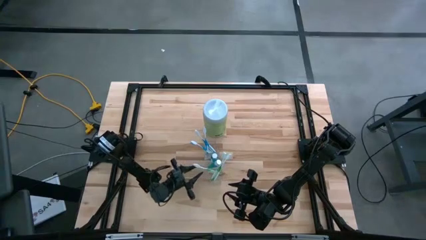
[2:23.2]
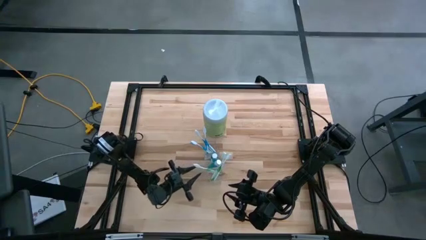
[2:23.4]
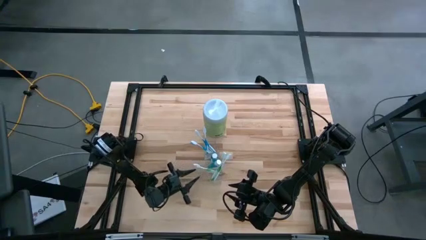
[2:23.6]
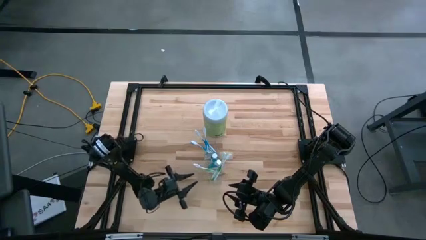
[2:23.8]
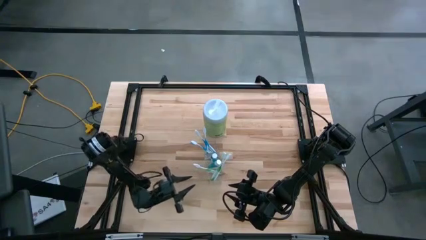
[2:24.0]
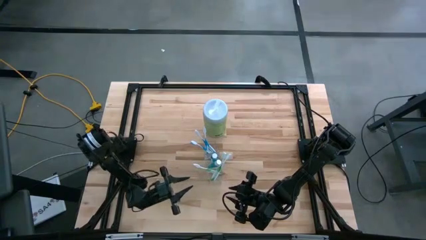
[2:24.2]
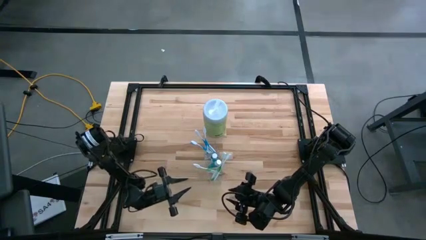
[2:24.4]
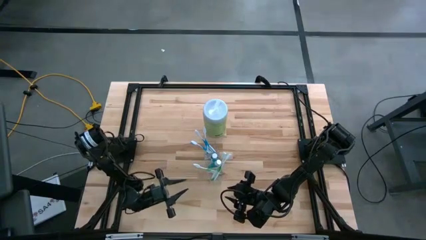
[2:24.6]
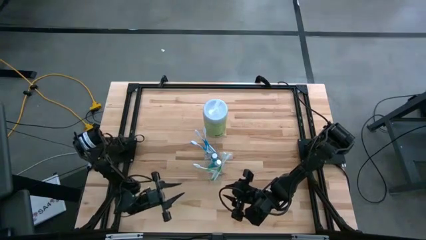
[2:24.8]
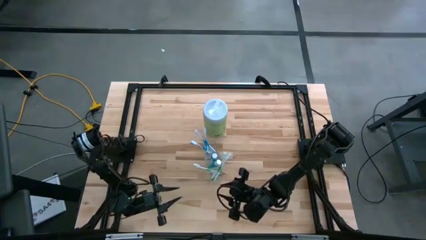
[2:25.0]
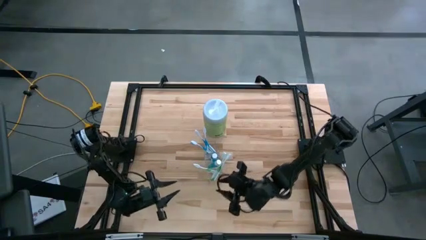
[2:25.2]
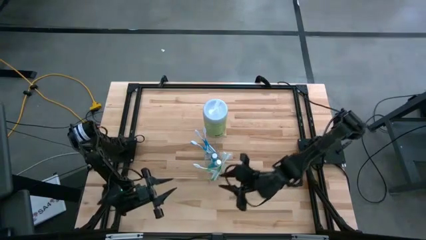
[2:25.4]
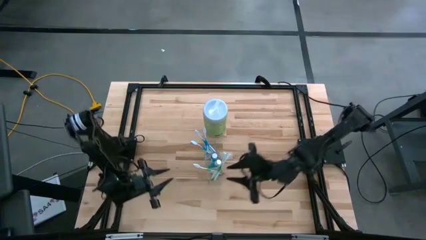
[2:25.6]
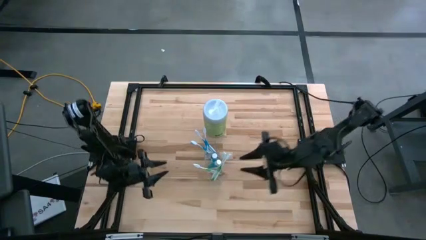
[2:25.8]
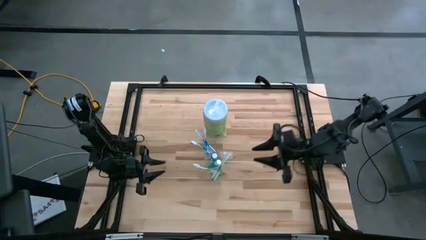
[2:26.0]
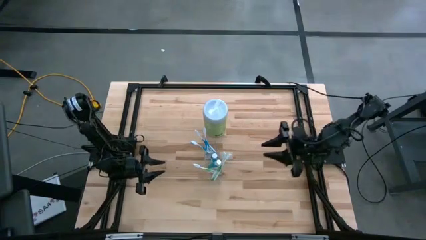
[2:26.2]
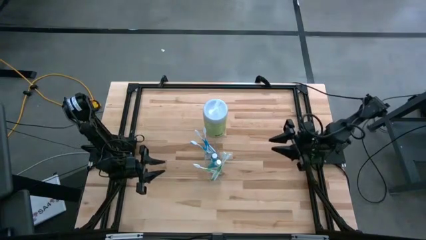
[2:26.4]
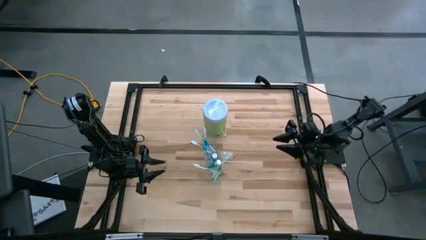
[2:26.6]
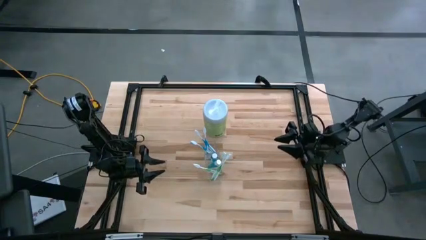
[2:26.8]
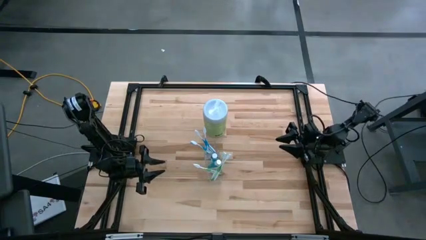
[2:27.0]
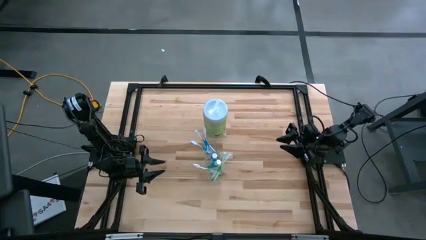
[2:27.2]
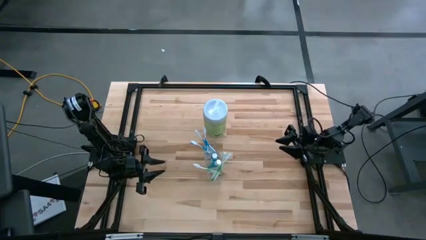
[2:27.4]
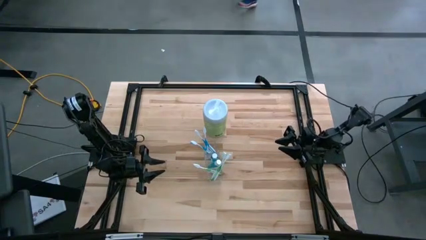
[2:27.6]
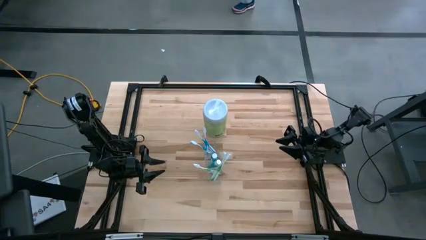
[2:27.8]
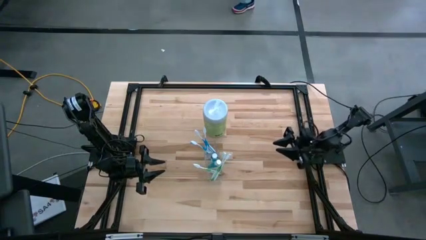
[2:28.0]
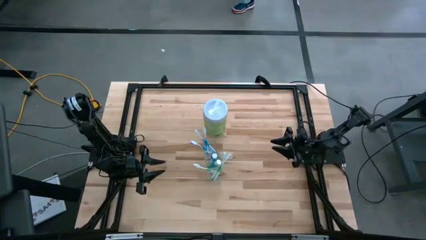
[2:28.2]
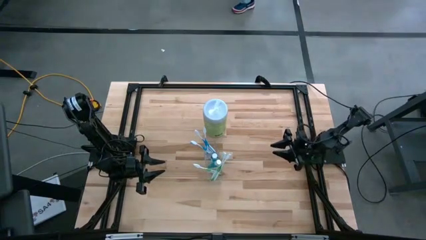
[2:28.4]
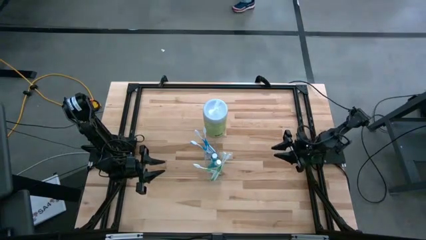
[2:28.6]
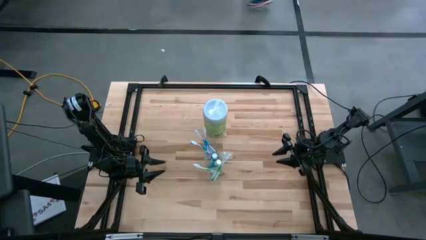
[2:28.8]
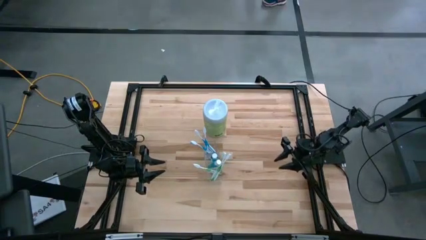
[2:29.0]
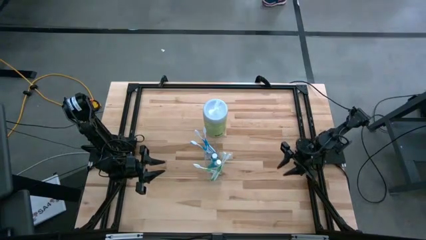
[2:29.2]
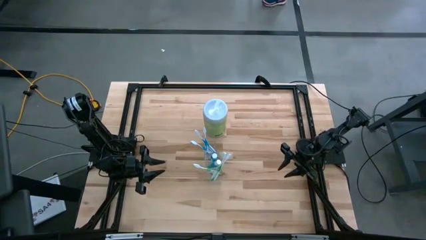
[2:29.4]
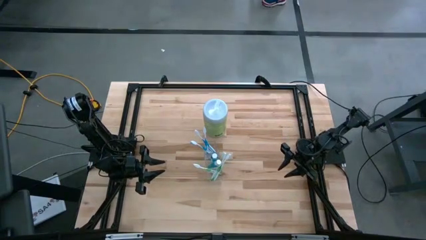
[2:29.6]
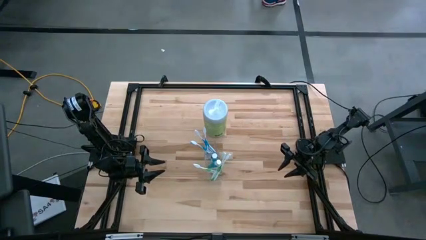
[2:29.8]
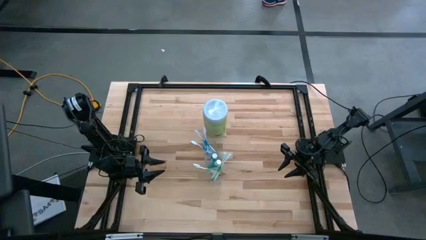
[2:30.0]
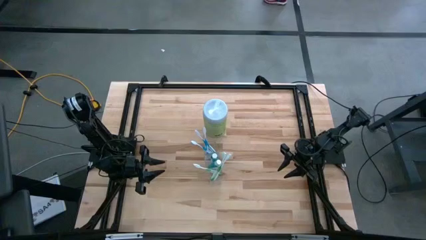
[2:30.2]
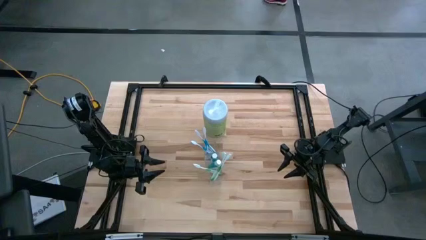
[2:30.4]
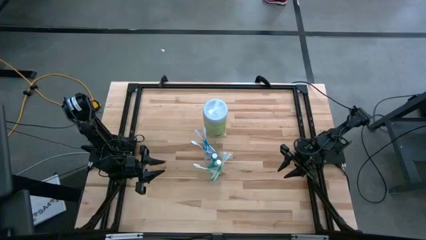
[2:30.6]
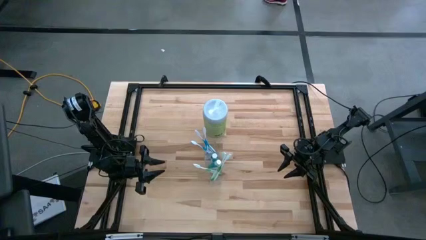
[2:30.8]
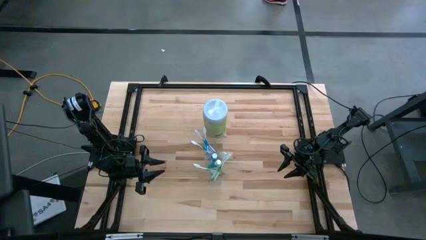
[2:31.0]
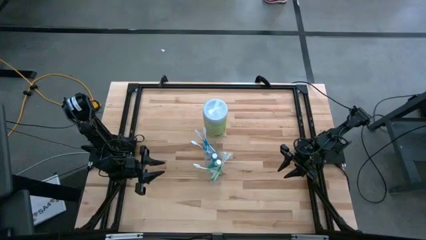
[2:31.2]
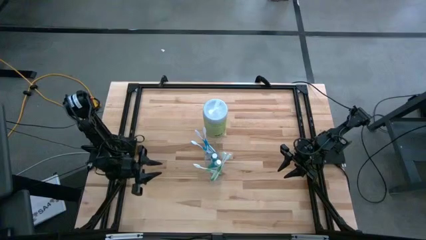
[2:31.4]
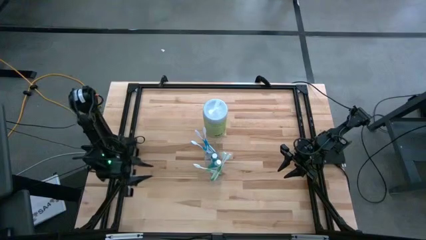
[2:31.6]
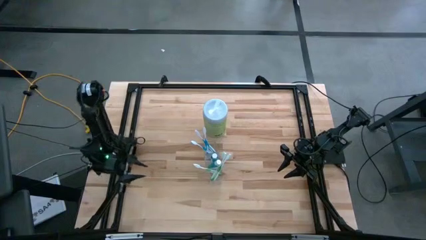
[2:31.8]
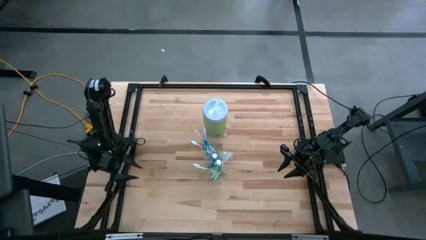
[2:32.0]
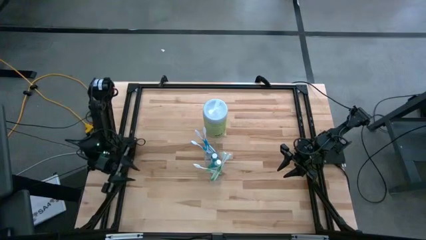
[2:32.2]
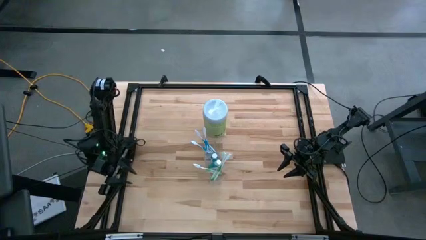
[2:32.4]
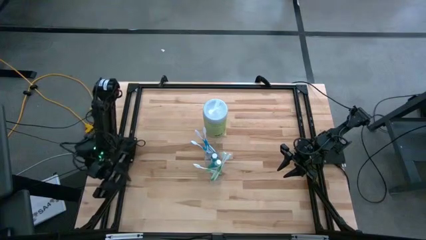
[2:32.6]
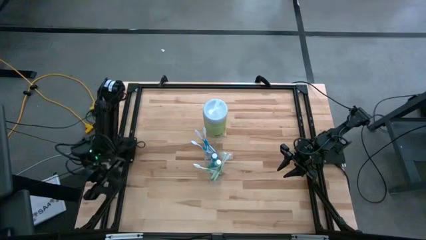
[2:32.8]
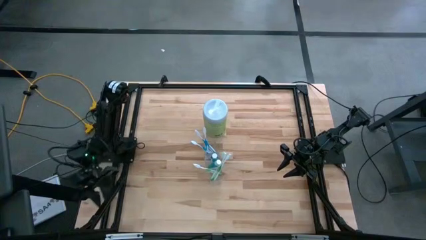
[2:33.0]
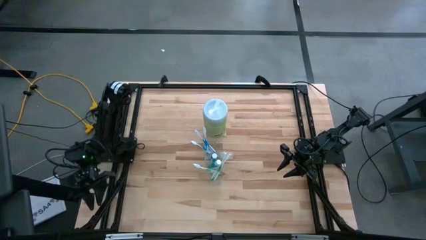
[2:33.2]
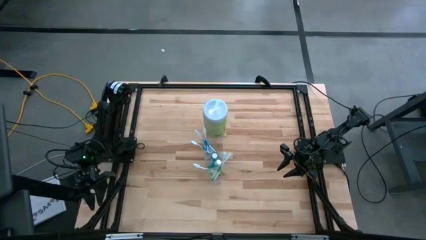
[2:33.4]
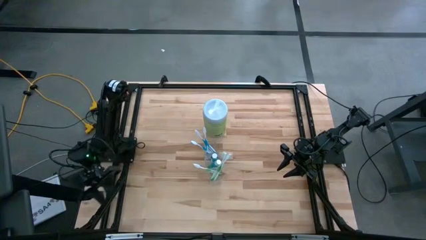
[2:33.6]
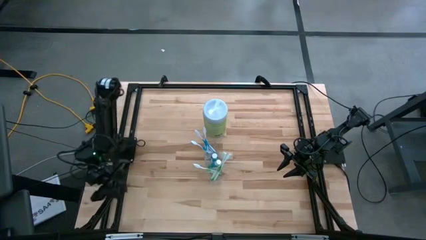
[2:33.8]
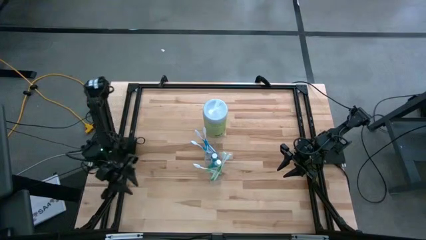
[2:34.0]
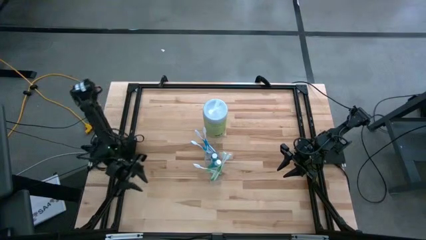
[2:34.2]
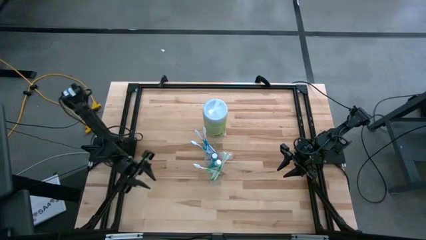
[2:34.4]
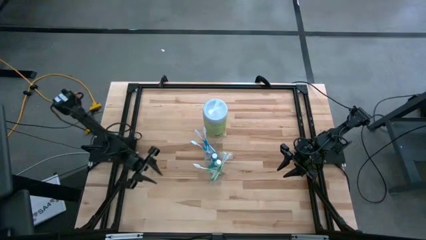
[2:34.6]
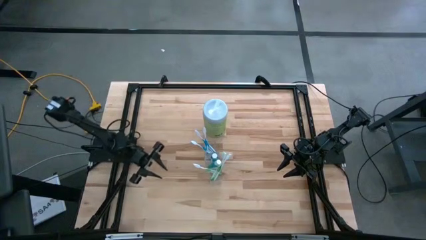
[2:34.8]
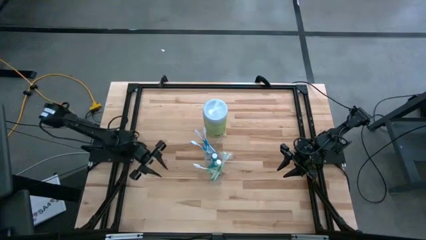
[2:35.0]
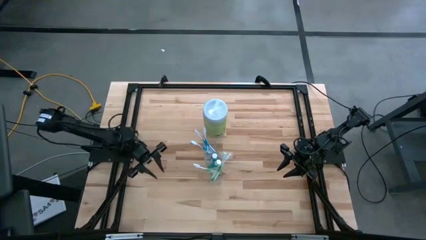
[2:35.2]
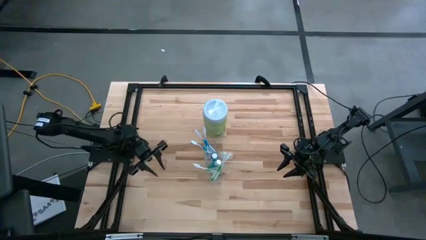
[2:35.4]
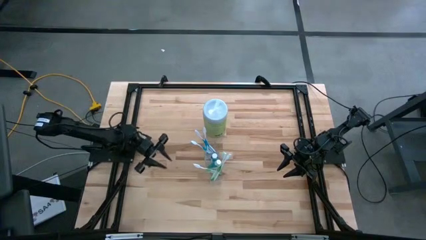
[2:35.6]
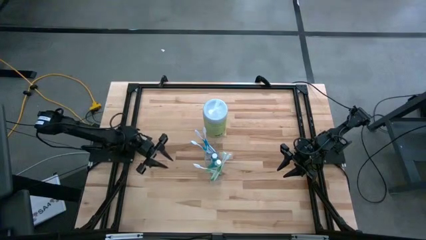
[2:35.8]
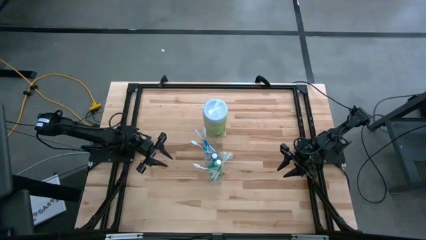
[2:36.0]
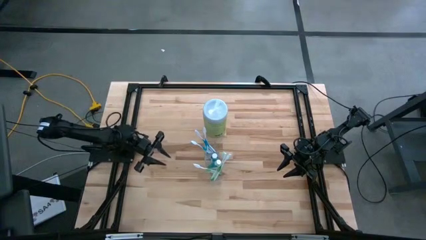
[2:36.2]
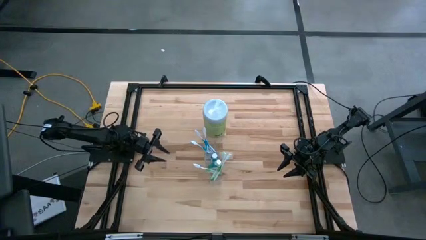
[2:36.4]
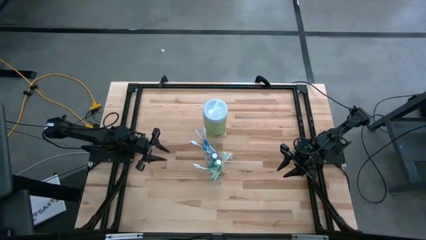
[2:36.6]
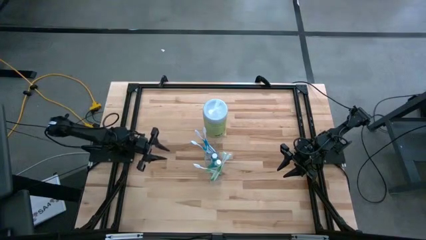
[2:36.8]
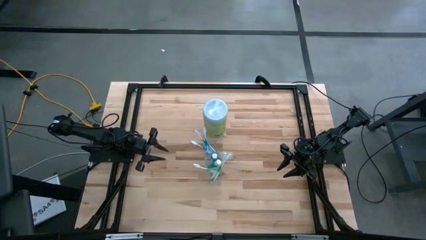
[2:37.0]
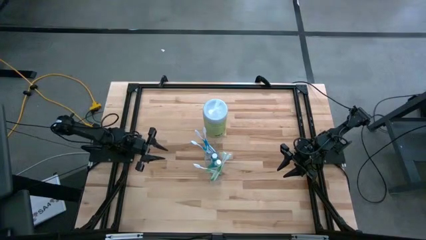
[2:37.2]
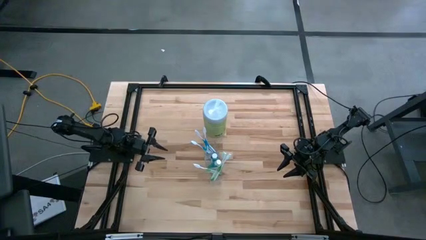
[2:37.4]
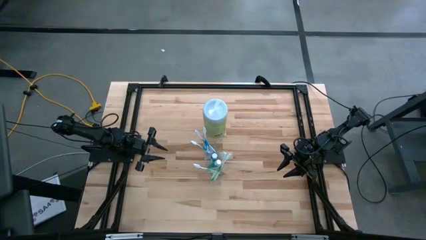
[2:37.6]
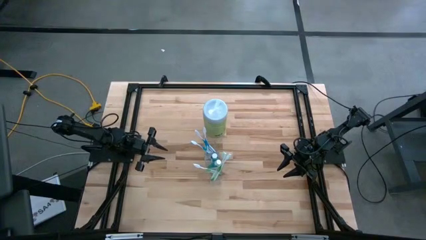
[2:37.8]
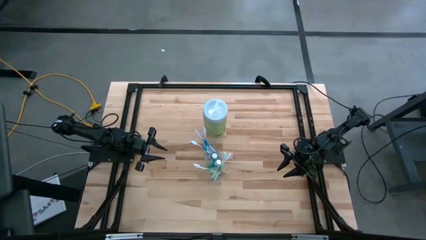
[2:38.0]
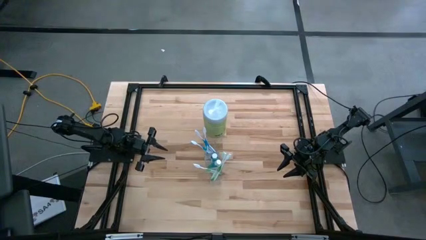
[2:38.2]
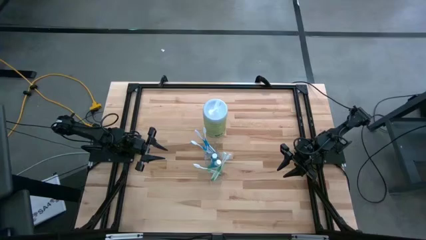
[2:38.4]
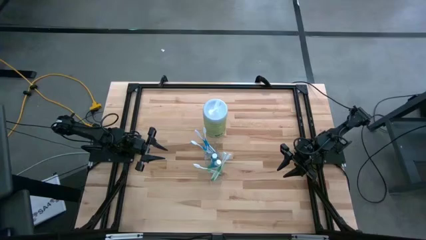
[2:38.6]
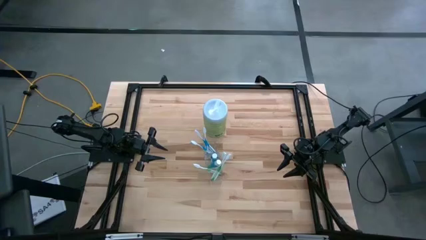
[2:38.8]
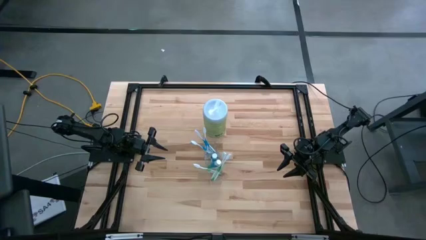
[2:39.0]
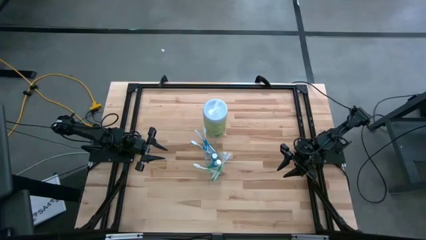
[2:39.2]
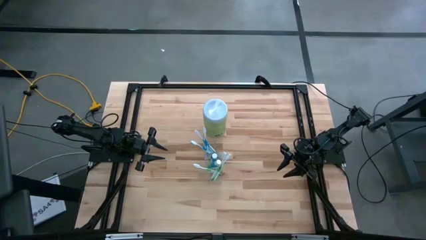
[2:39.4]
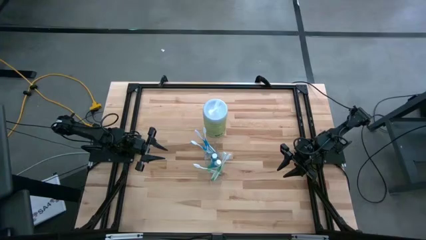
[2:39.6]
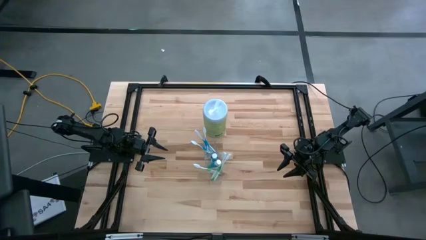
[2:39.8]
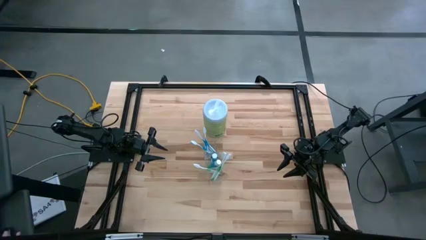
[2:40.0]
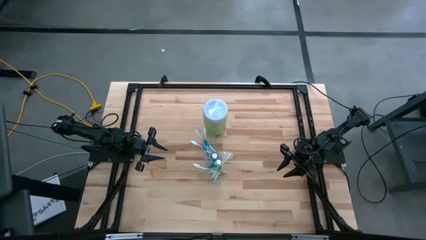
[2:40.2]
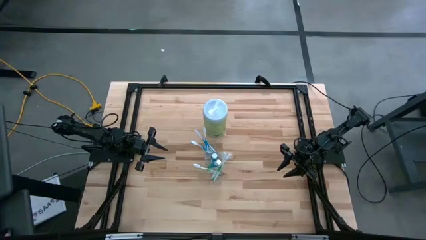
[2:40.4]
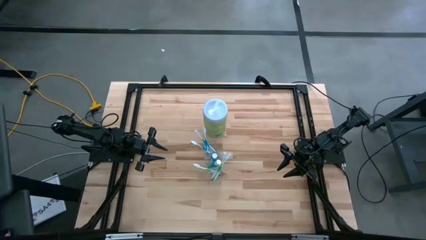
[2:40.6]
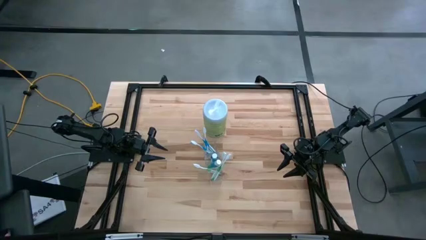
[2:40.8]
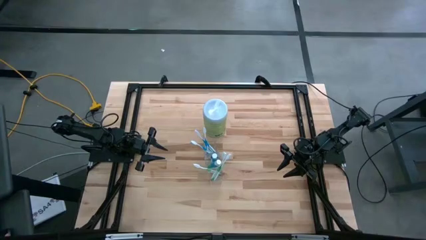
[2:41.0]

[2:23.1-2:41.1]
Task: Pick & Place toothbrushing station
Return to Home Position
